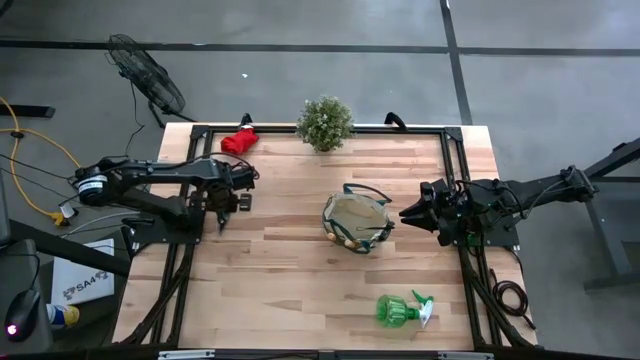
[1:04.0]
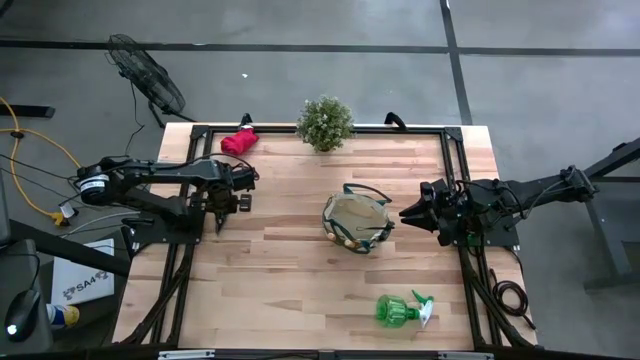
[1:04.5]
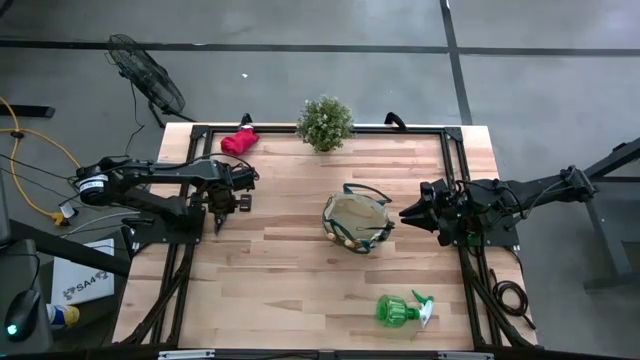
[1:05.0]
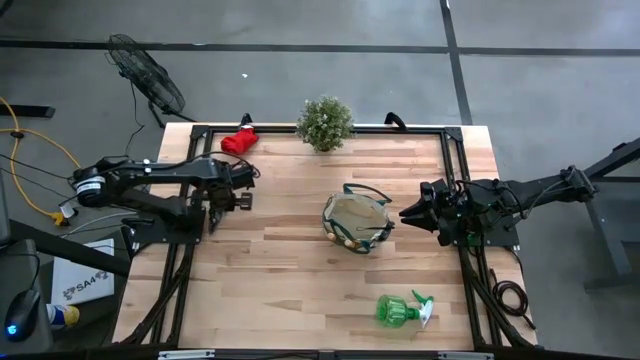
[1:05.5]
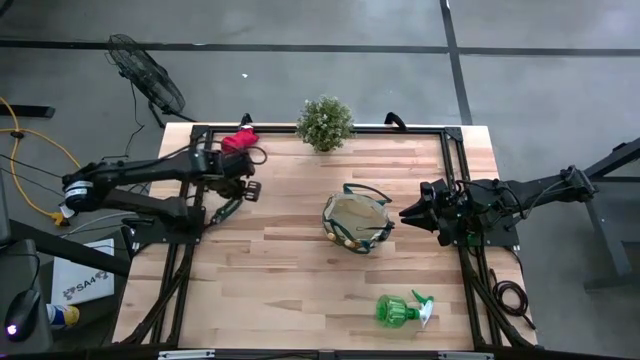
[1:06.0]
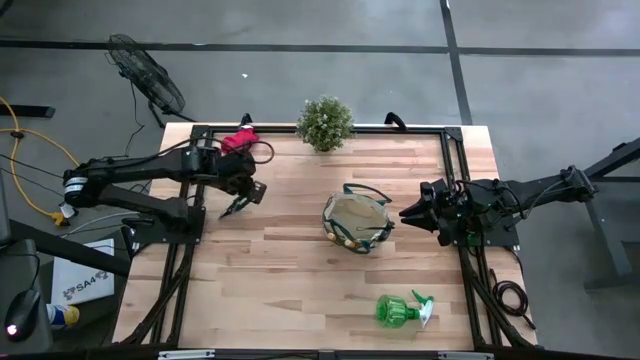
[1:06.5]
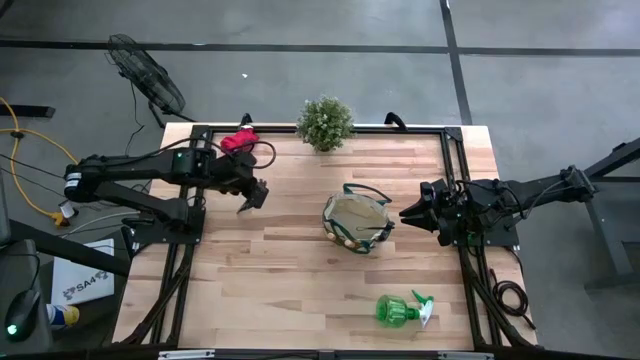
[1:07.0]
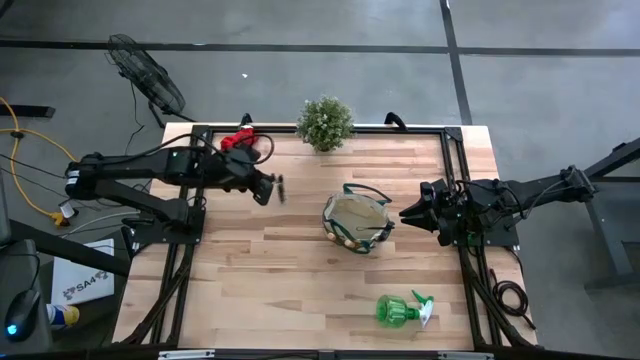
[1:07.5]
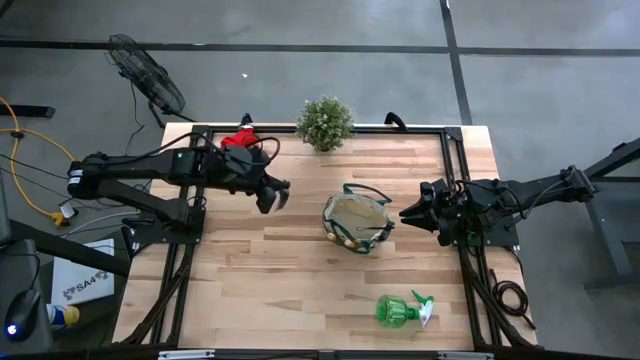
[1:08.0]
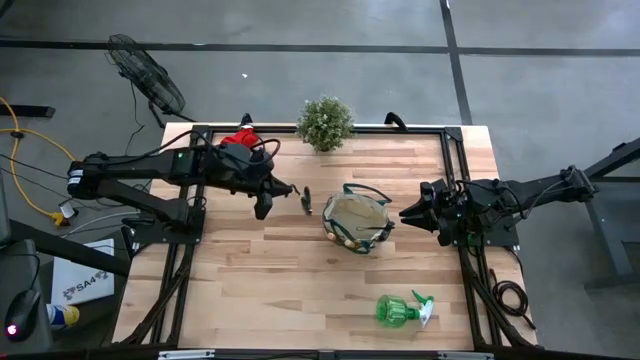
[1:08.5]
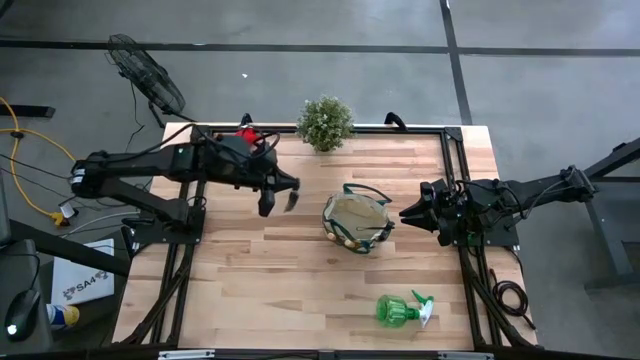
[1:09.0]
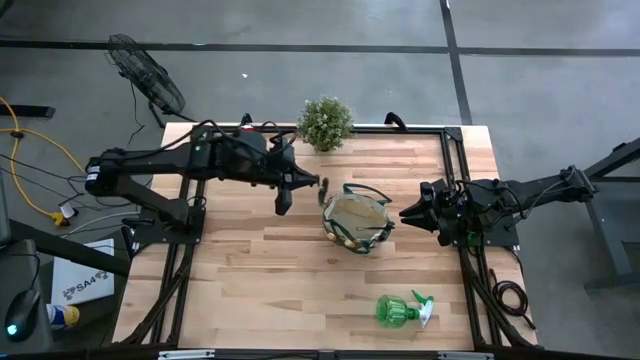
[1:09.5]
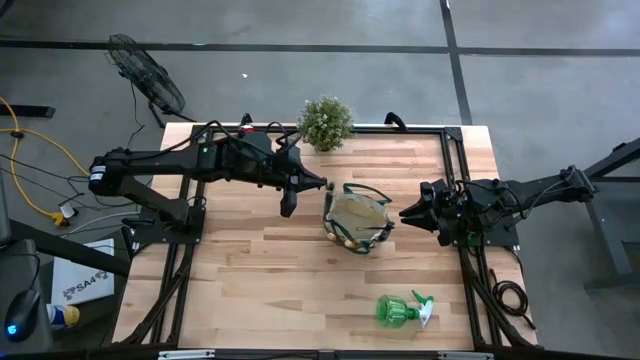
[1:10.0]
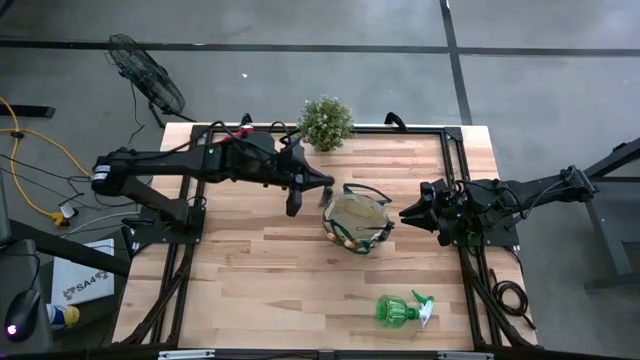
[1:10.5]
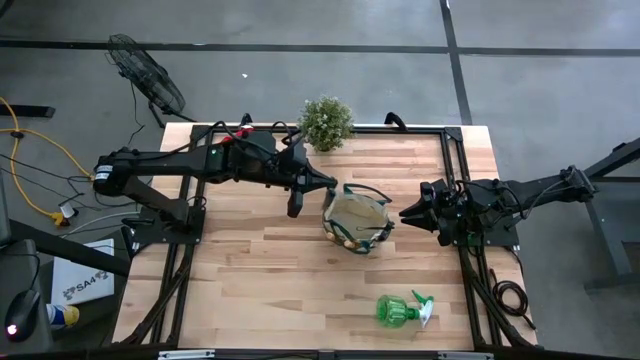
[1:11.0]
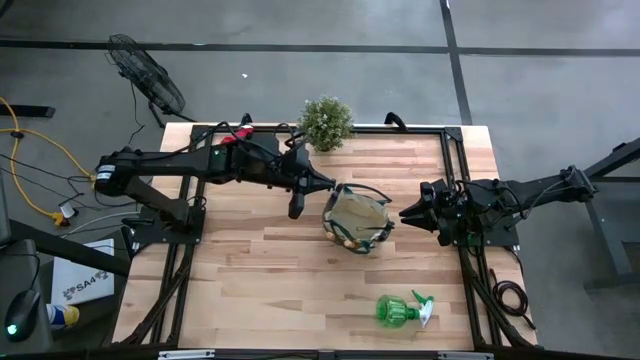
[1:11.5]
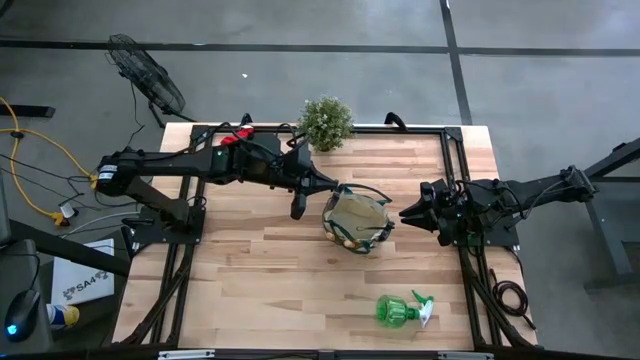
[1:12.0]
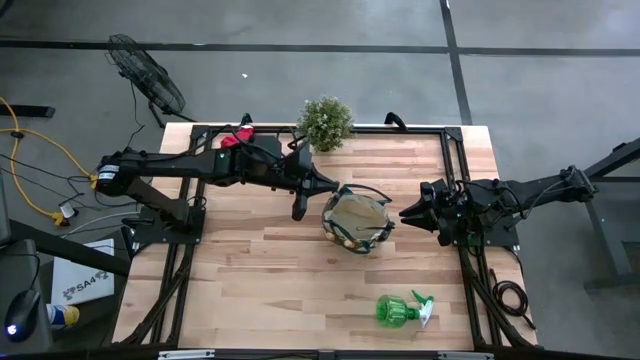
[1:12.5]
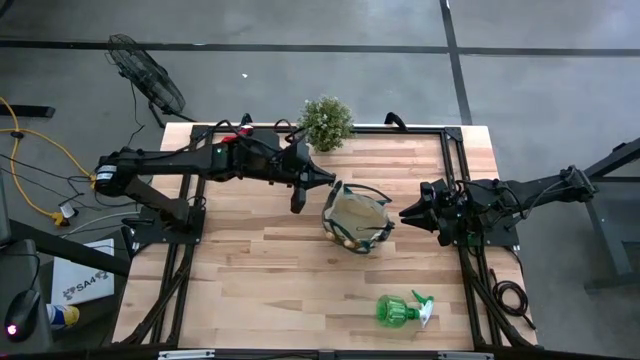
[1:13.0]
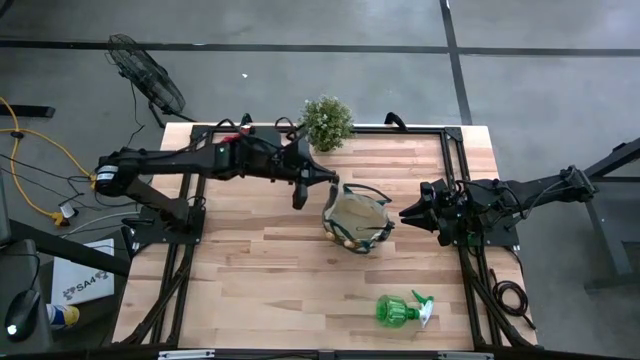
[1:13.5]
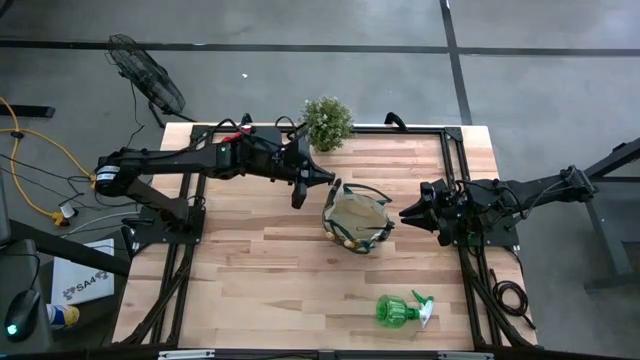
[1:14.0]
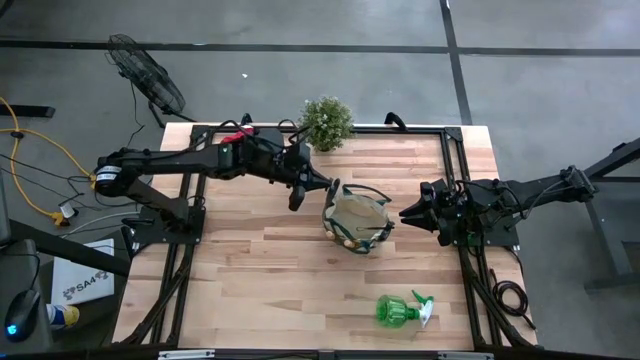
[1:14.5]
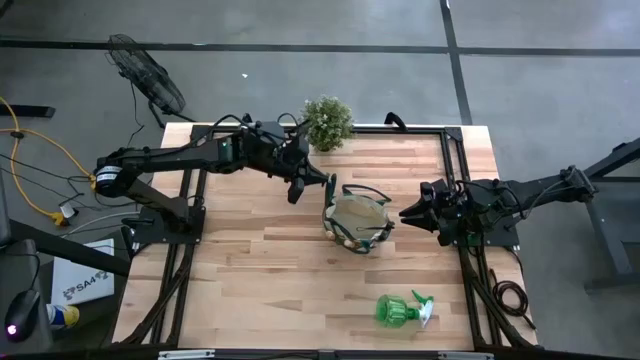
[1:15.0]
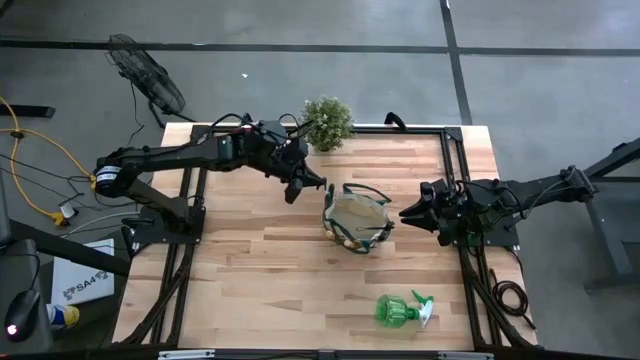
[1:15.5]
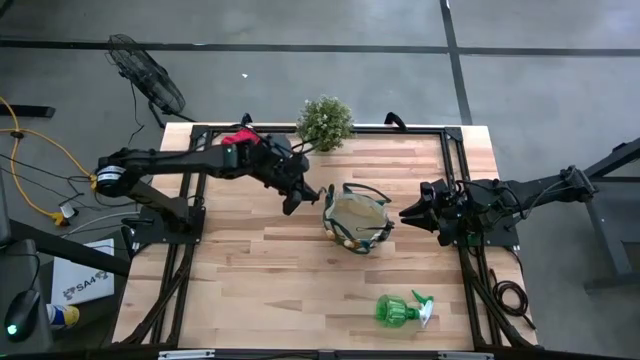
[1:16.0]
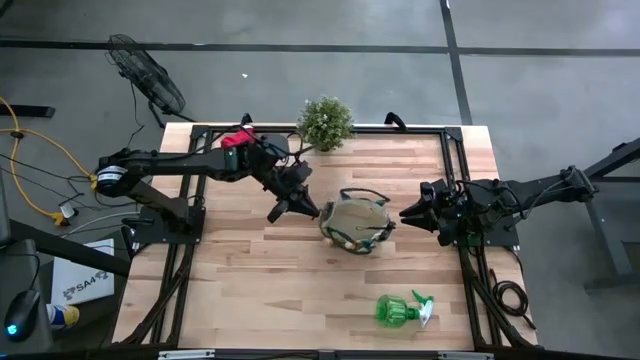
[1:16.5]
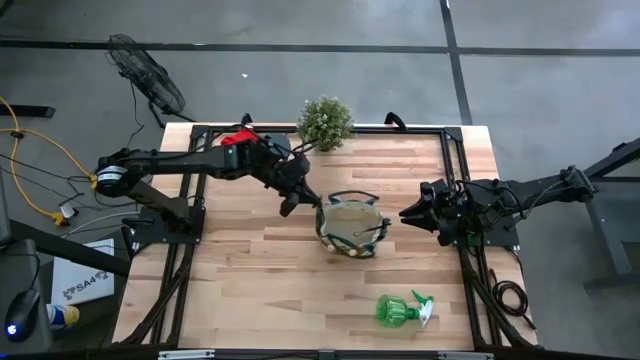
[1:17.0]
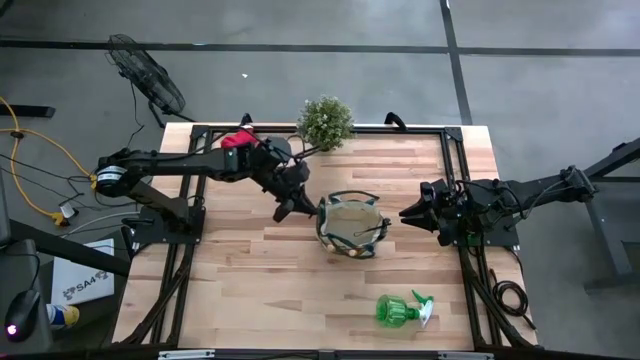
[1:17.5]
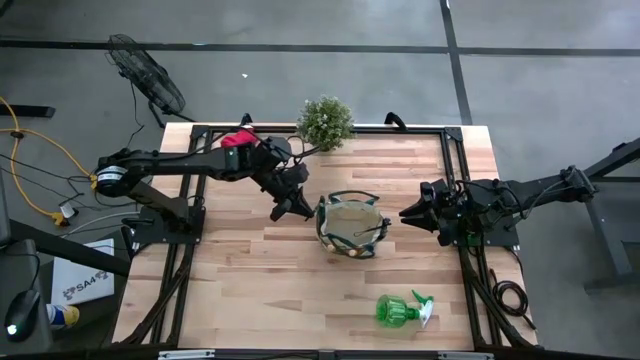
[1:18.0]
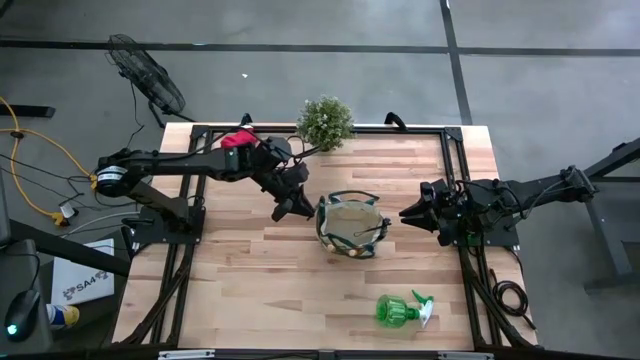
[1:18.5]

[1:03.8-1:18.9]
Task: Pick & Place Garden tools in Gardening bag
Put the green shear scissors into the brown gardening bag

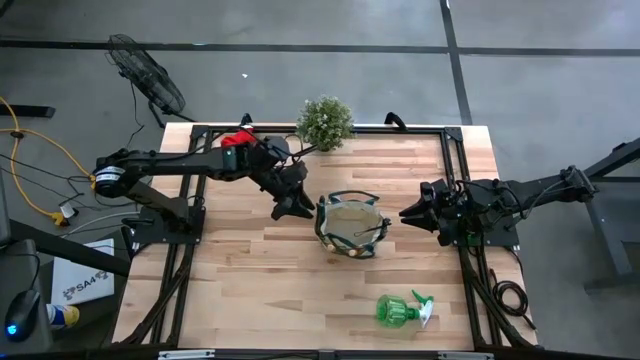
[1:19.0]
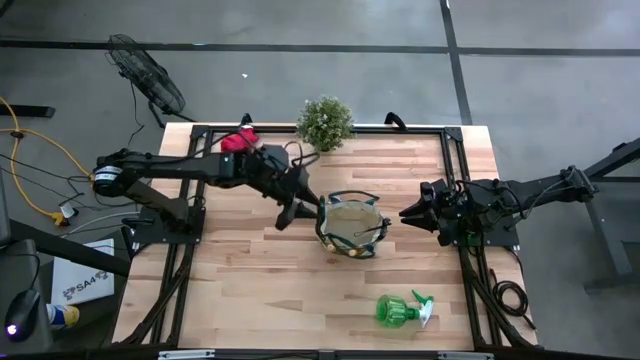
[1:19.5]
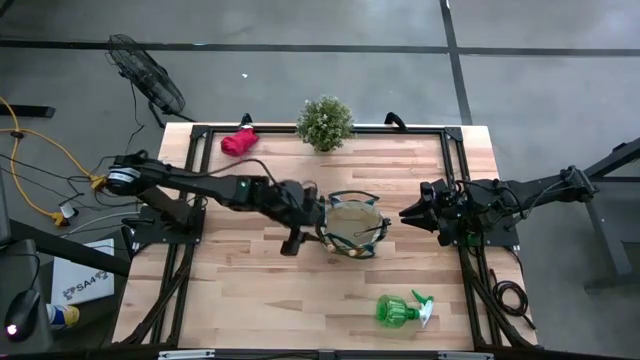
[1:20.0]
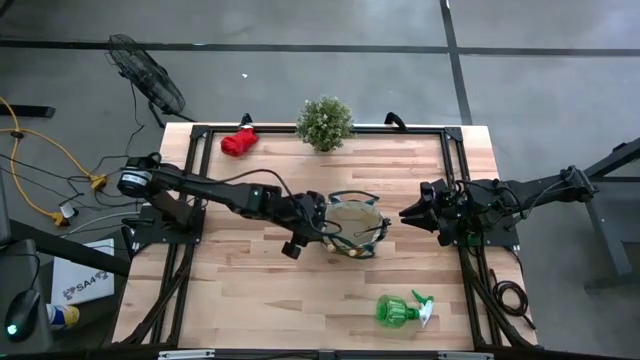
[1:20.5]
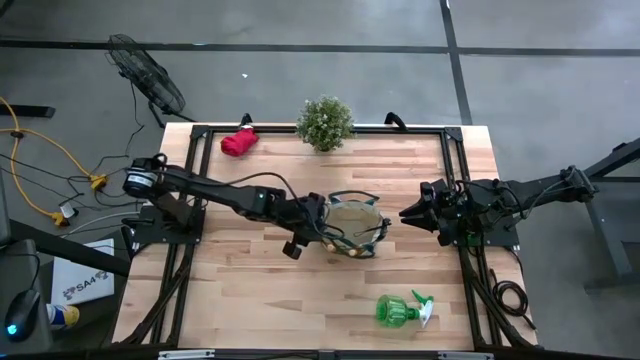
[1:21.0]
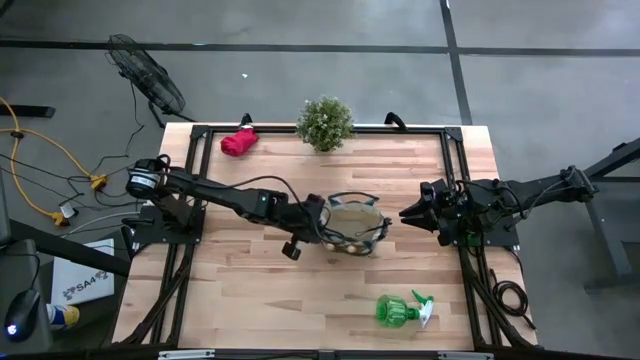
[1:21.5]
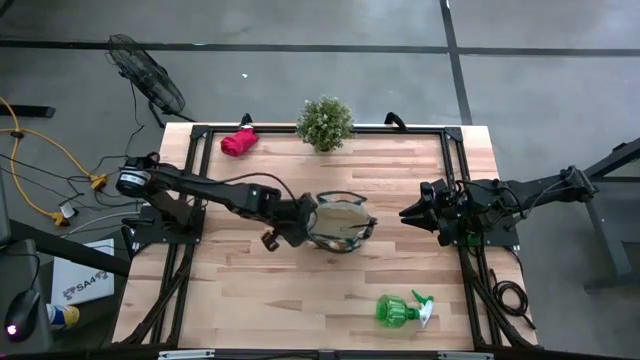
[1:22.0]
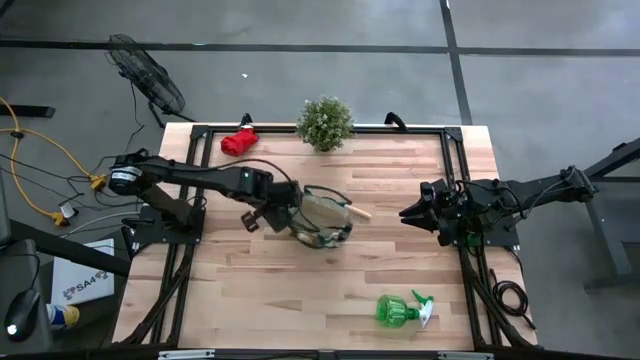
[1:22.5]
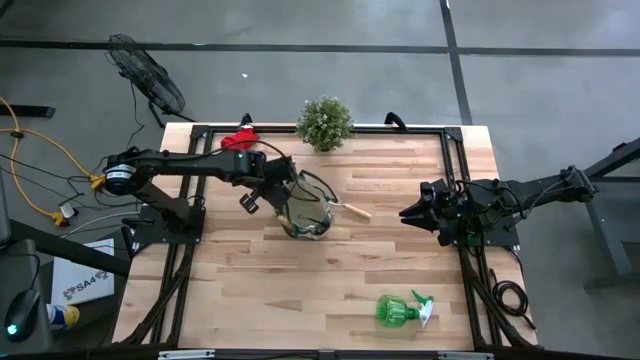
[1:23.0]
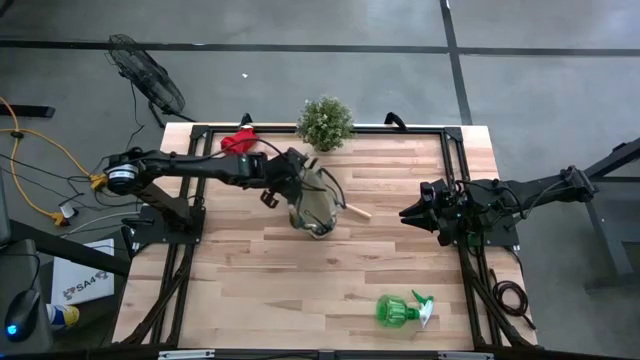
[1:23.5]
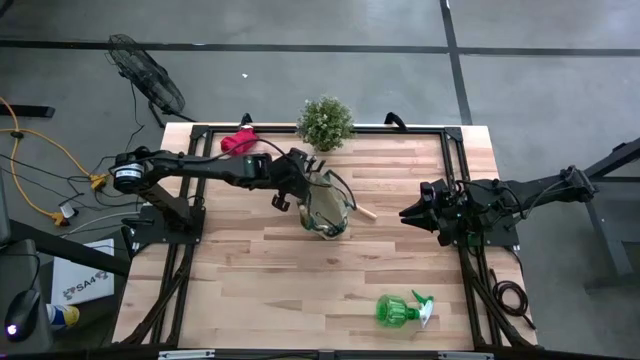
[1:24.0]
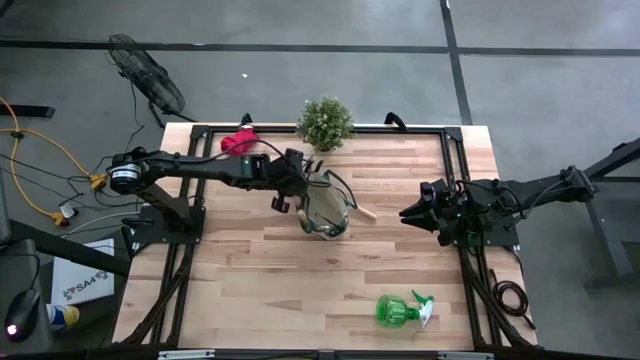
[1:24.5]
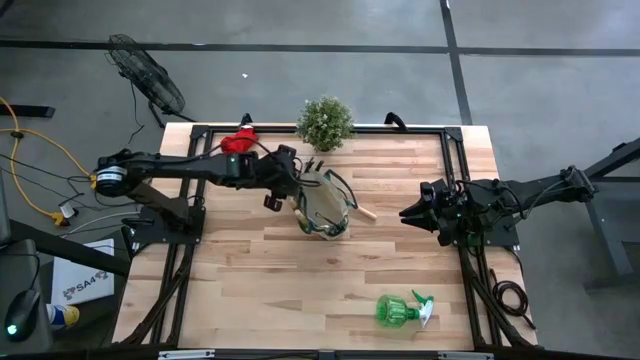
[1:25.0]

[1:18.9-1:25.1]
Adjust the brown gardening bag
